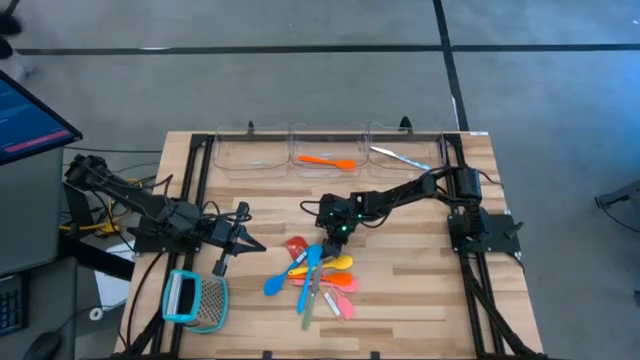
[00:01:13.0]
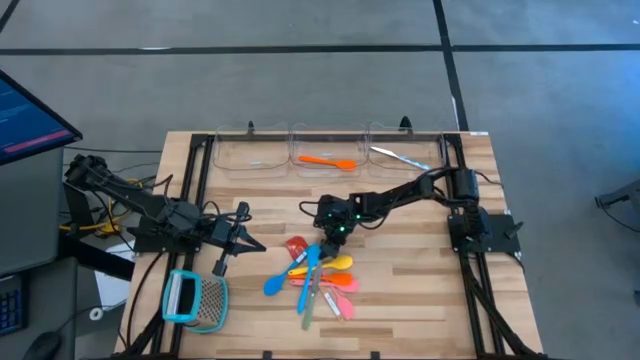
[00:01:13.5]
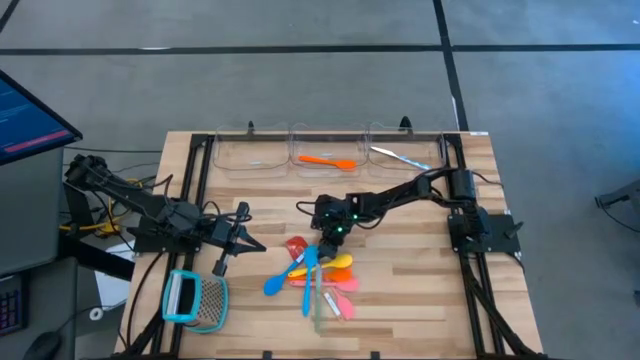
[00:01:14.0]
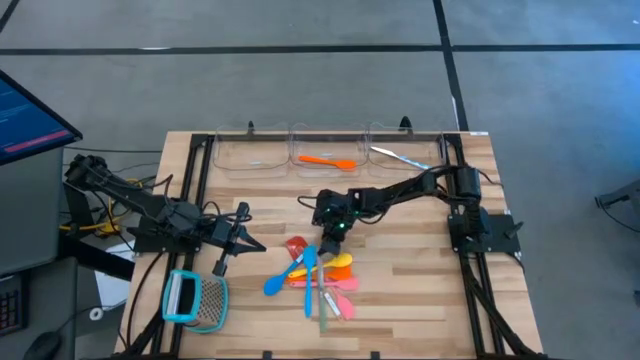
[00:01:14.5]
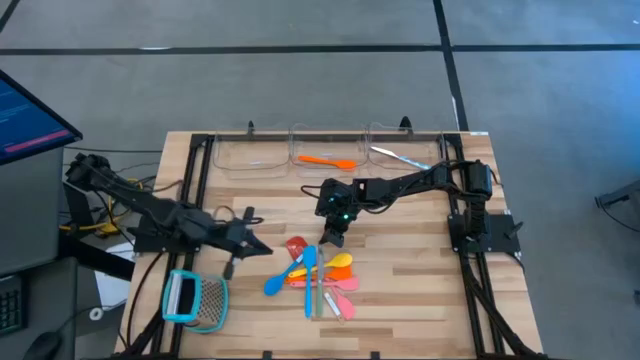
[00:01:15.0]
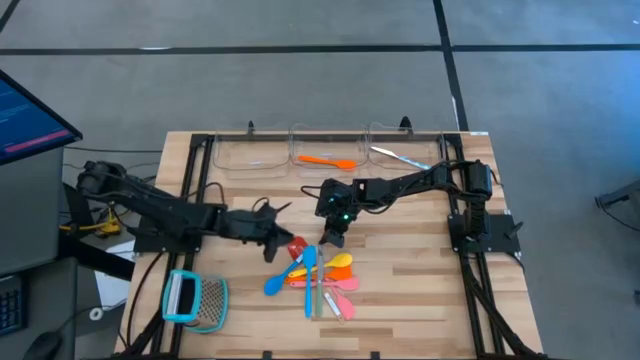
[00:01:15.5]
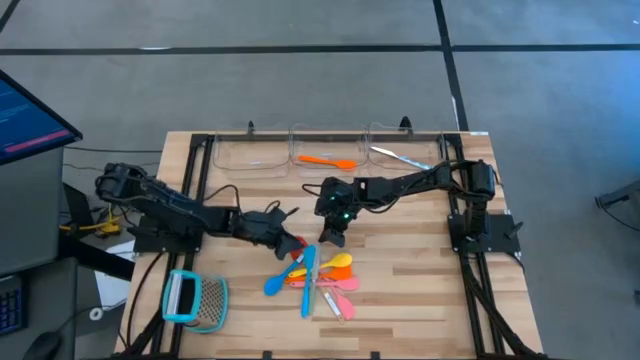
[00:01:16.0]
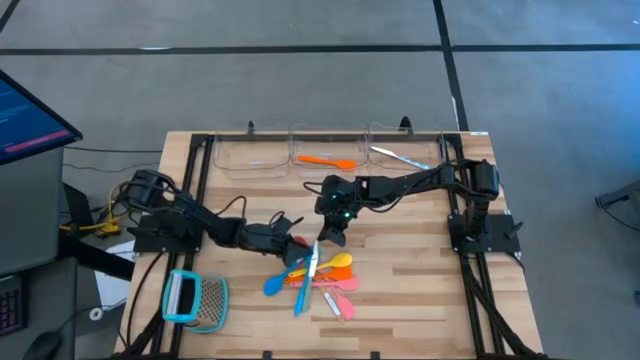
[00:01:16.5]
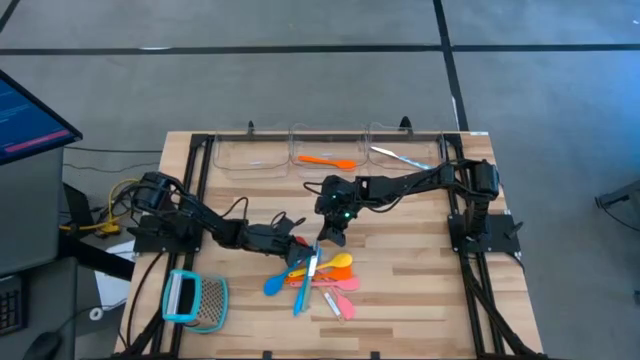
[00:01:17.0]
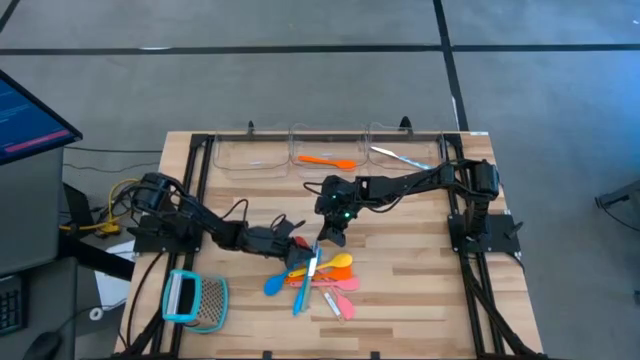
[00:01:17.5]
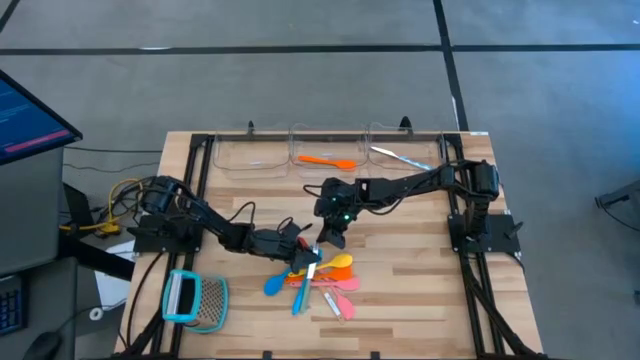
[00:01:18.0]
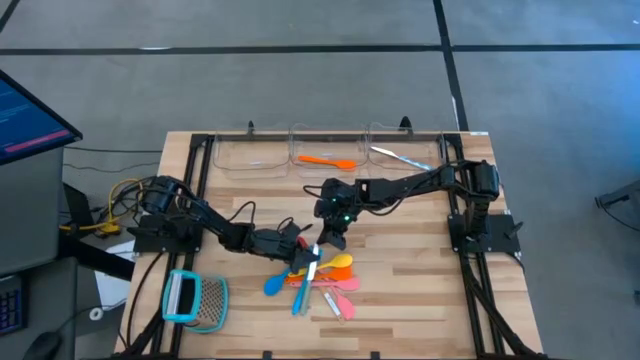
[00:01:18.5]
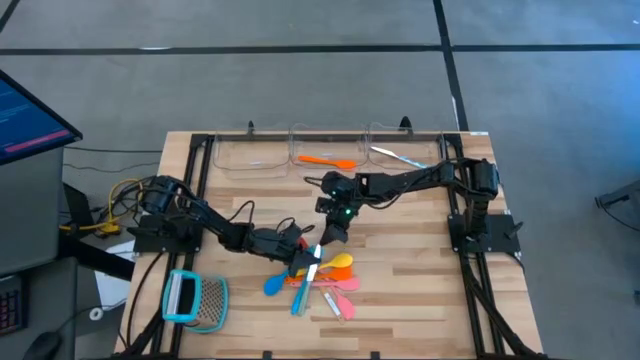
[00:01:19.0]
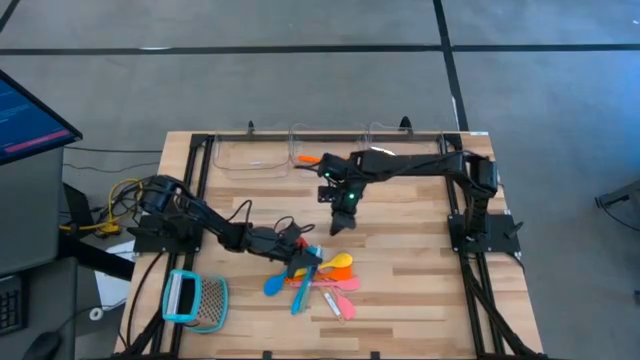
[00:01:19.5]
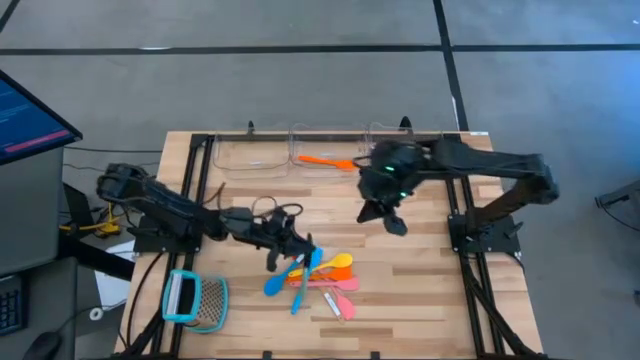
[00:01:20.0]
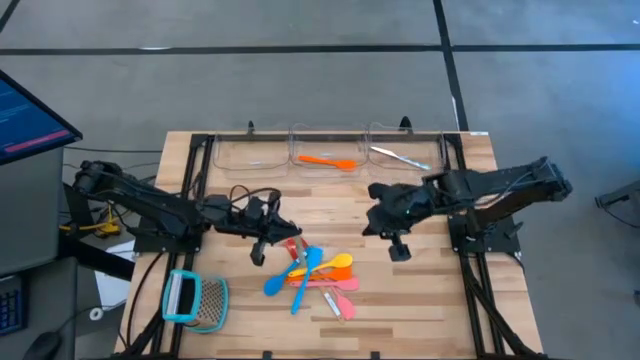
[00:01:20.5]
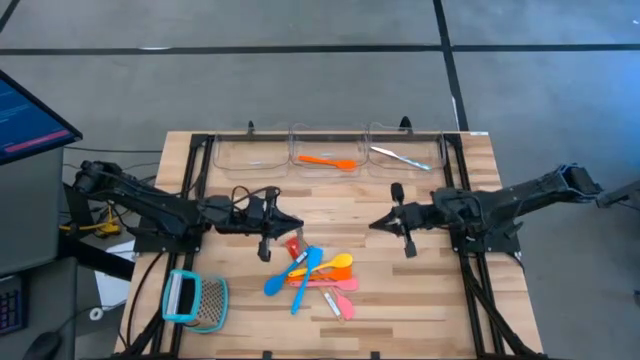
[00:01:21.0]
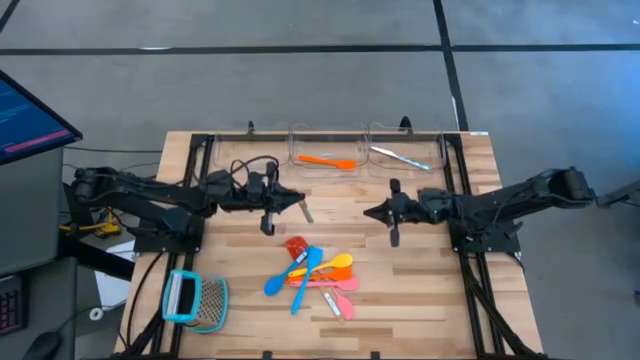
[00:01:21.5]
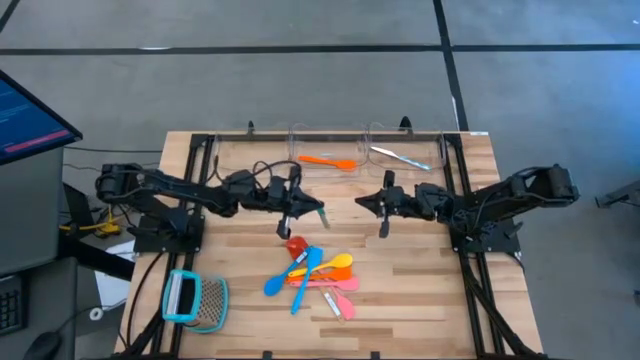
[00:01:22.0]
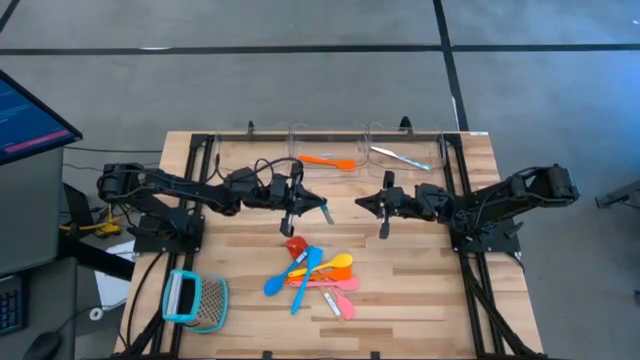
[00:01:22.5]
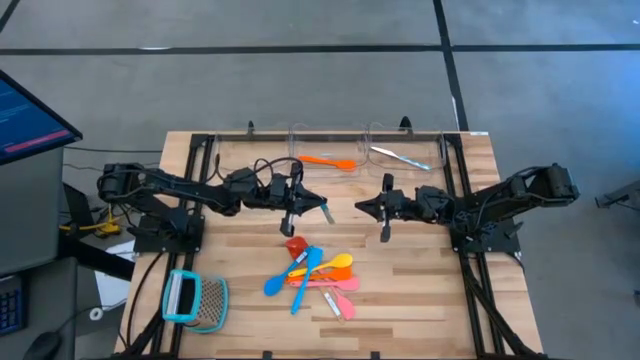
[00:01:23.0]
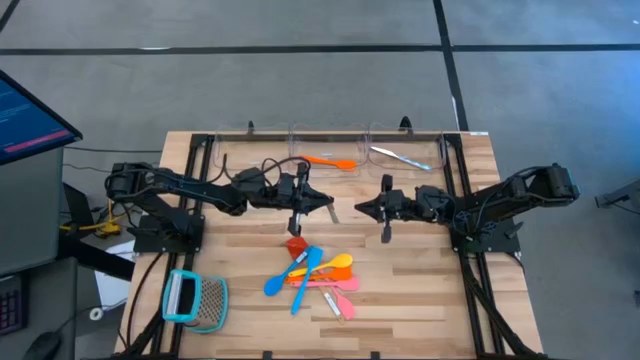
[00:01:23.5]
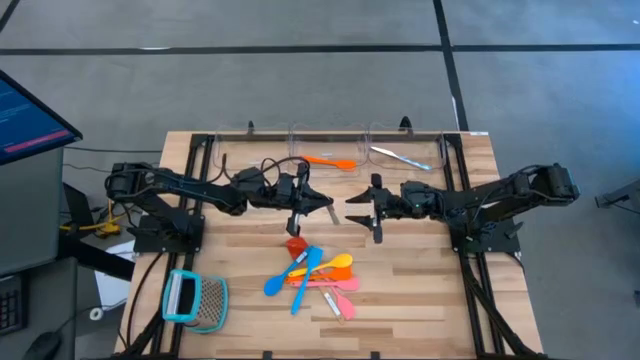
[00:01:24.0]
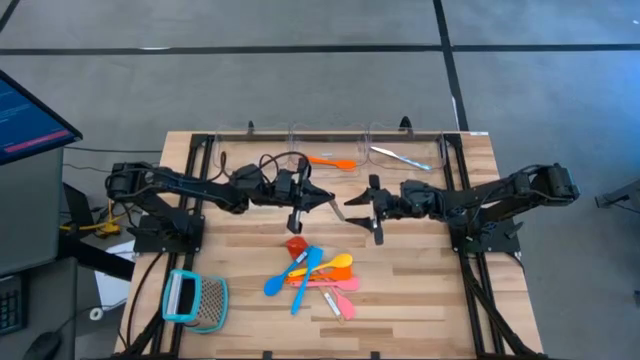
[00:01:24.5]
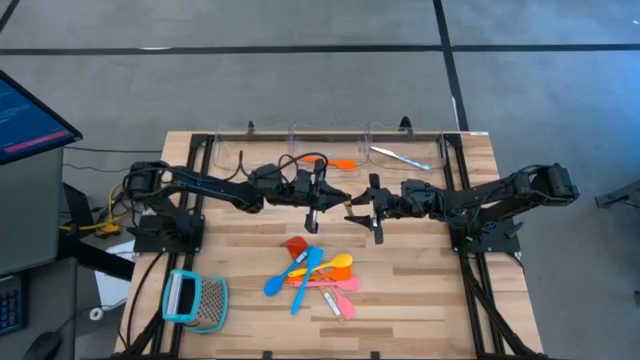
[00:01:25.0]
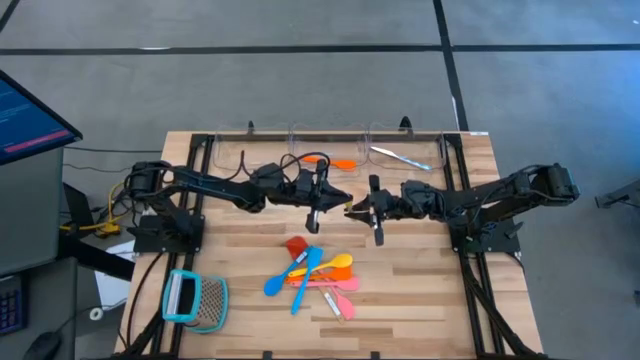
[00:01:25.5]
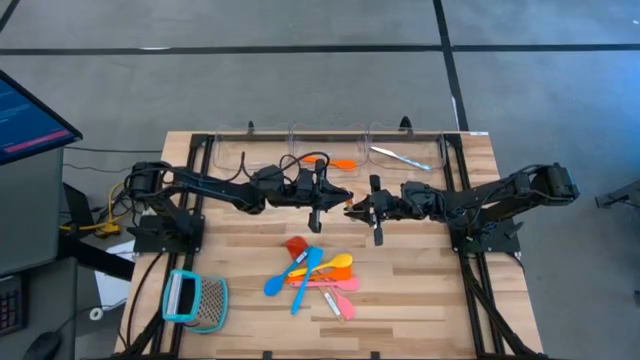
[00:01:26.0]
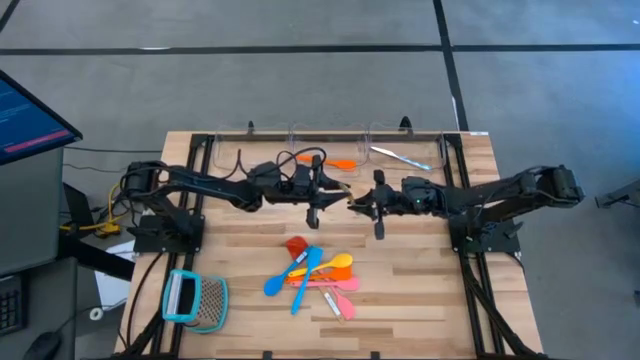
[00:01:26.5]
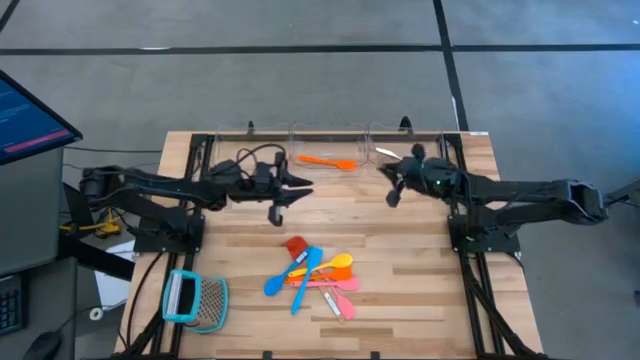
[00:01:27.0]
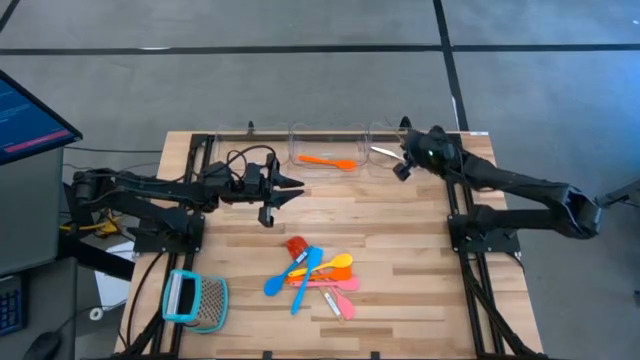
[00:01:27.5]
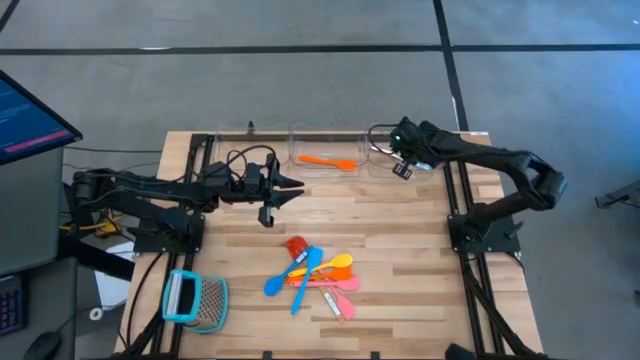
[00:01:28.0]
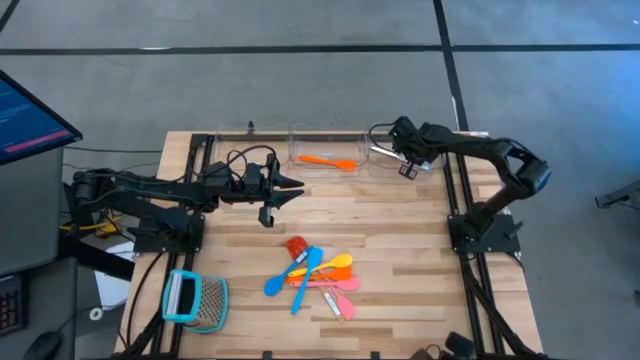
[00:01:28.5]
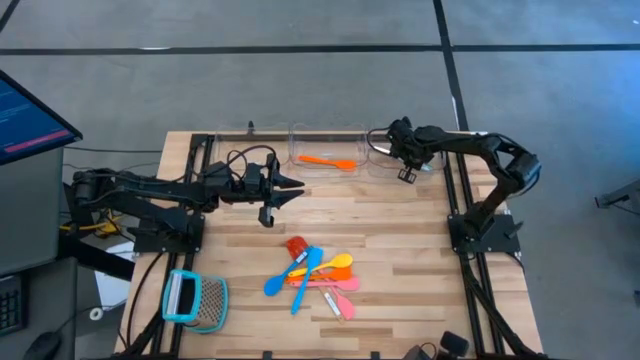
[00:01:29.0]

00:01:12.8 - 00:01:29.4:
Task: Pick & Place Kitchen Items
Put the green table knife into the right transparent bin

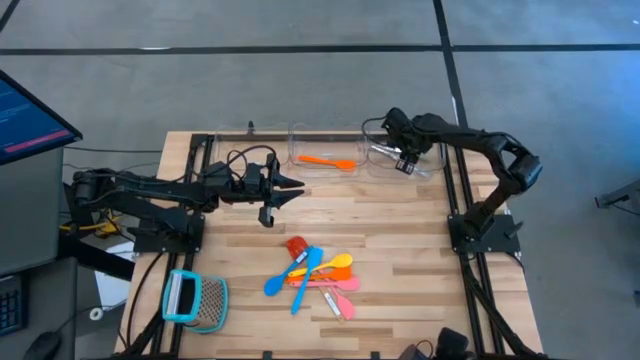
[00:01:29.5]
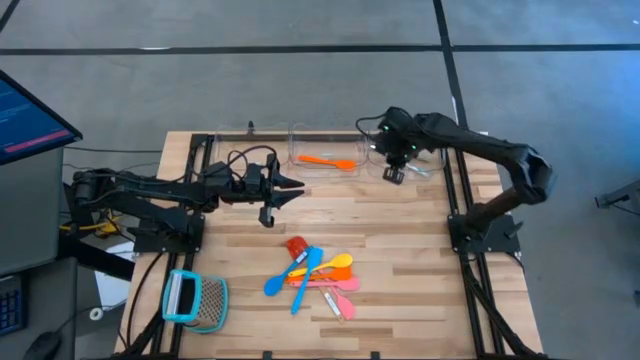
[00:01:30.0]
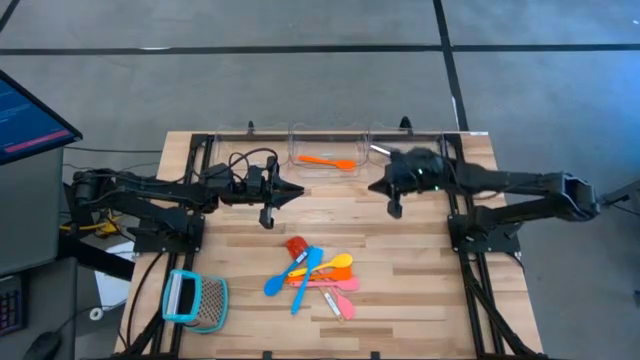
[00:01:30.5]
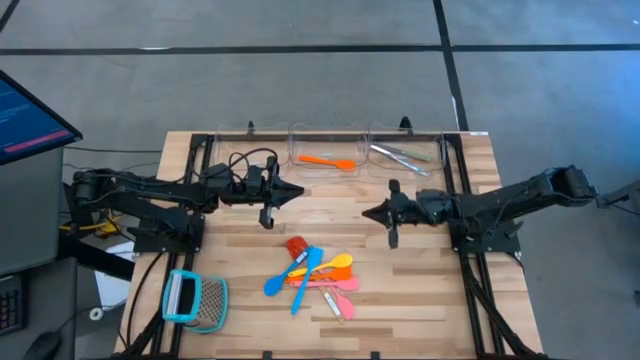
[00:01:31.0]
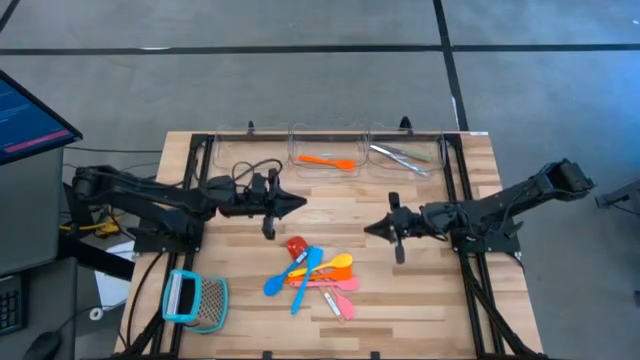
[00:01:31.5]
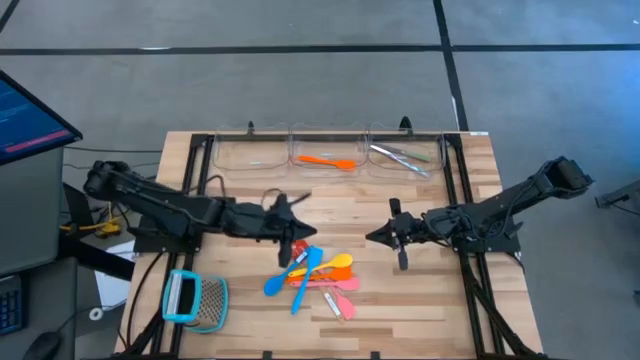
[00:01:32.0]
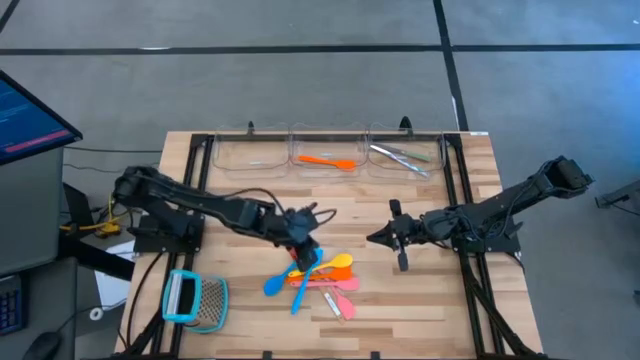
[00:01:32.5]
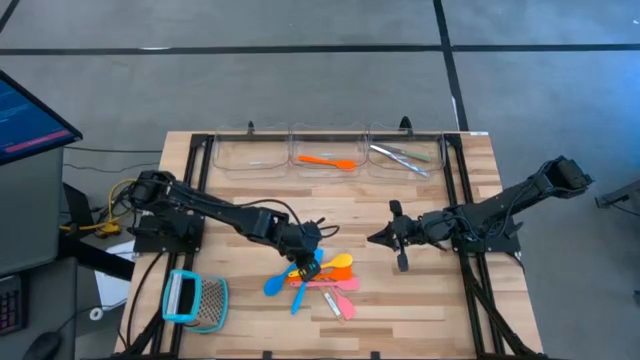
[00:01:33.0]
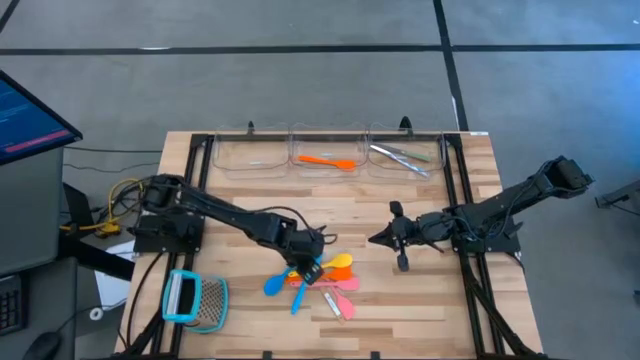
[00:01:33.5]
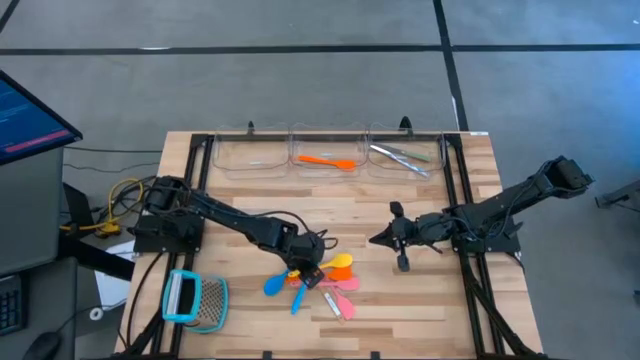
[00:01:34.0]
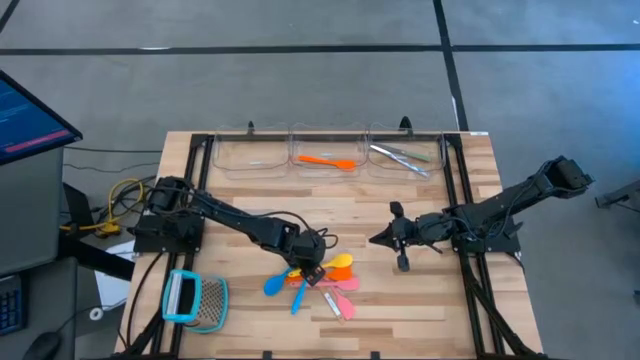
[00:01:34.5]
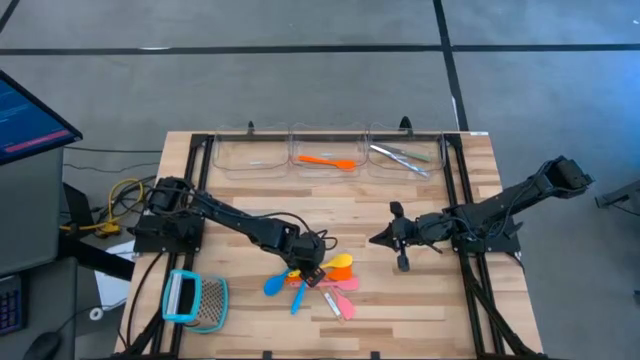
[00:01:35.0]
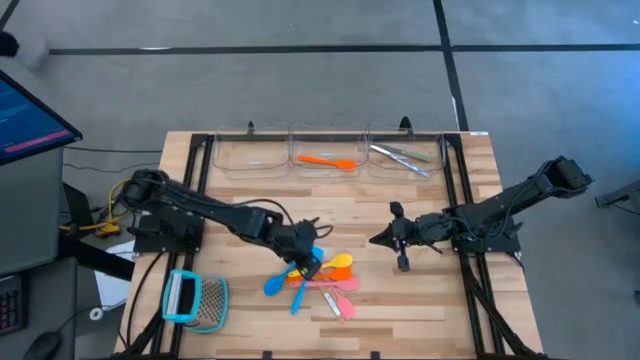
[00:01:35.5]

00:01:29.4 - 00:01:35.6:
Put the blue spatula into the middle transparent bin
